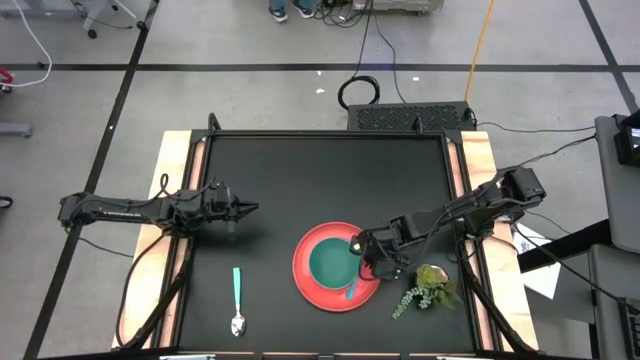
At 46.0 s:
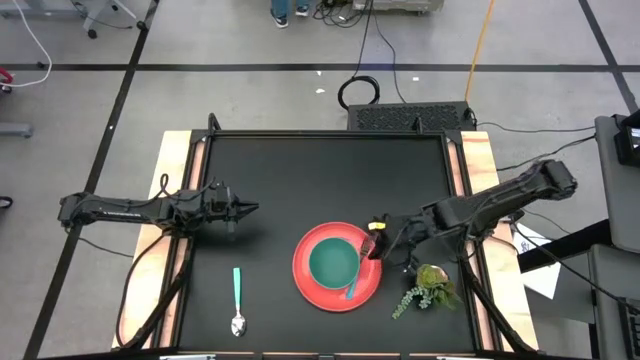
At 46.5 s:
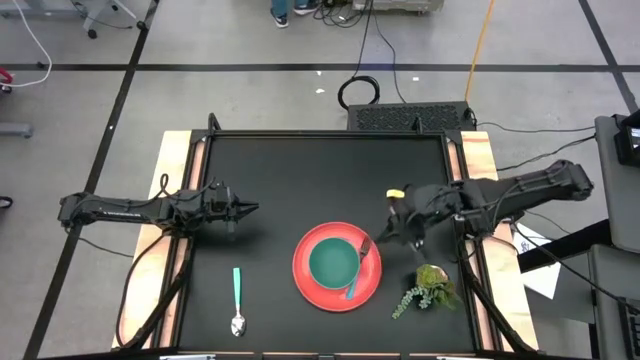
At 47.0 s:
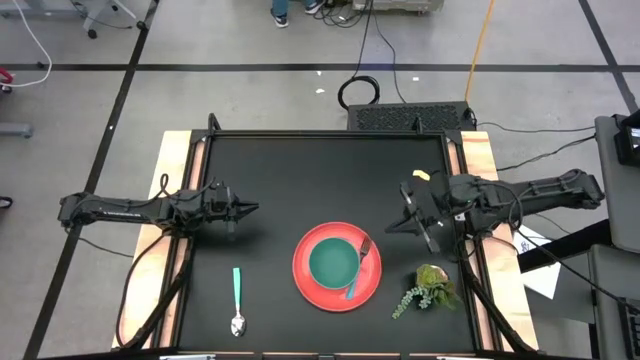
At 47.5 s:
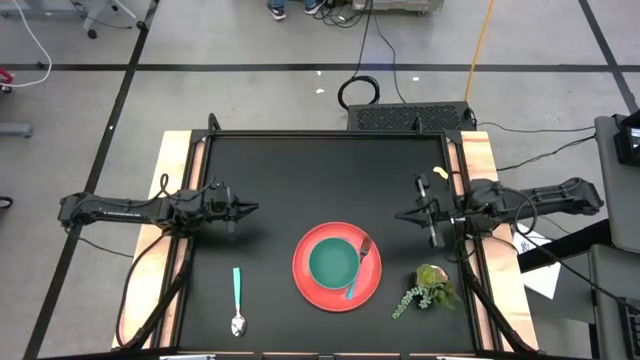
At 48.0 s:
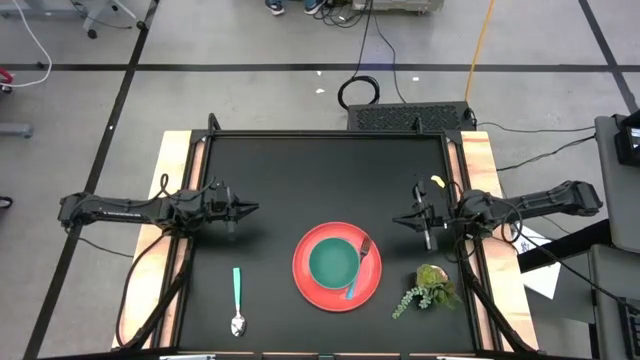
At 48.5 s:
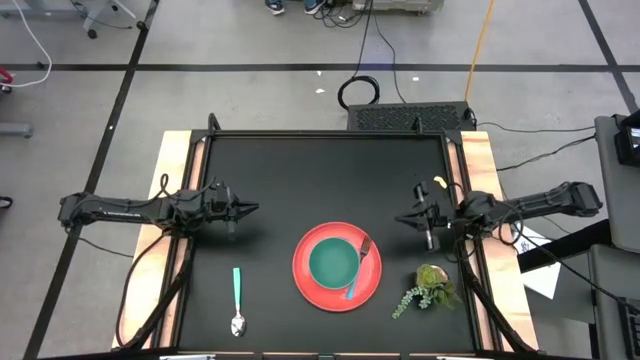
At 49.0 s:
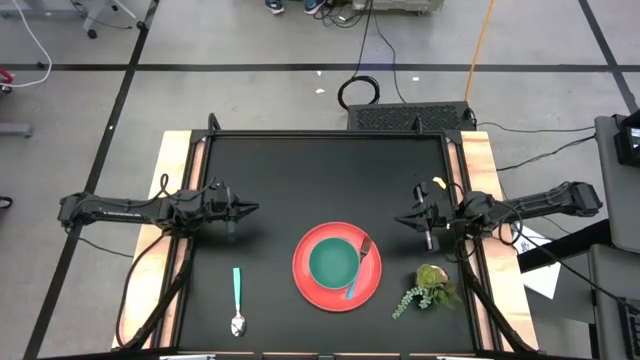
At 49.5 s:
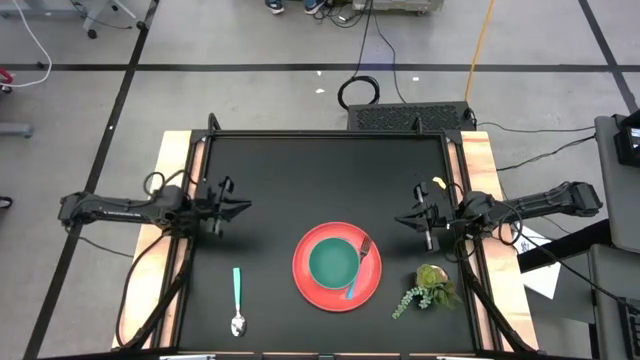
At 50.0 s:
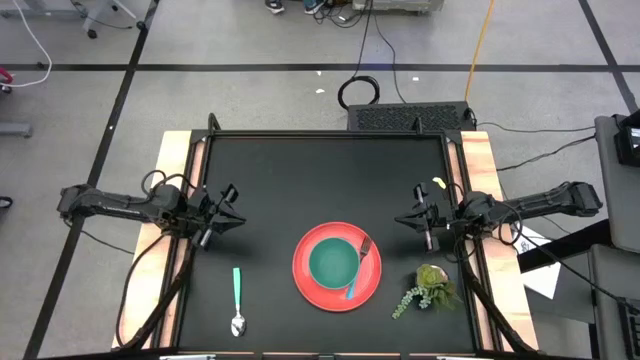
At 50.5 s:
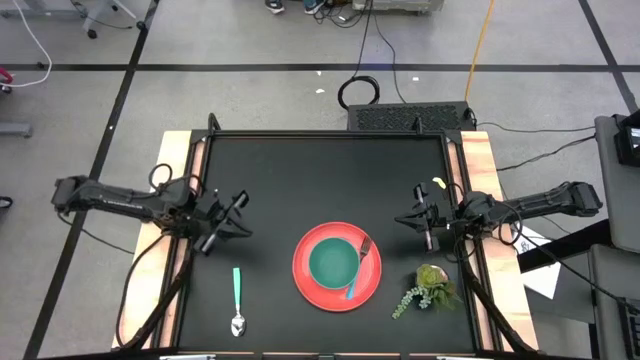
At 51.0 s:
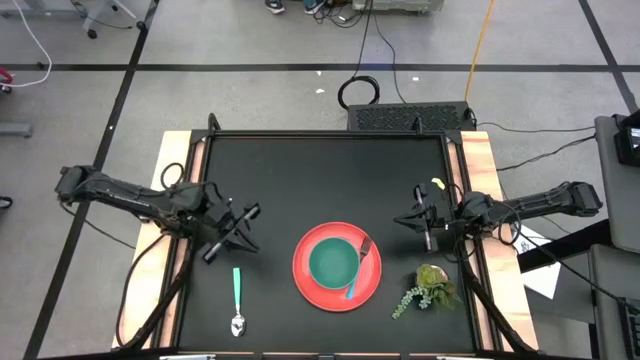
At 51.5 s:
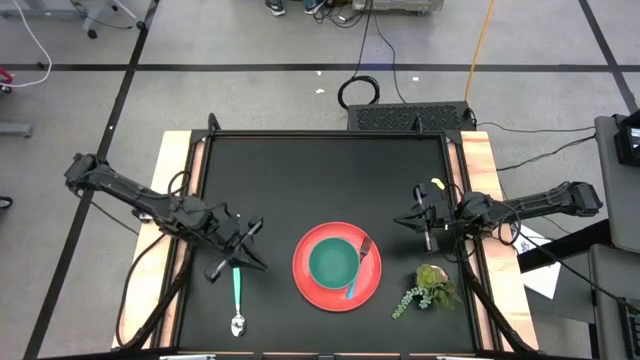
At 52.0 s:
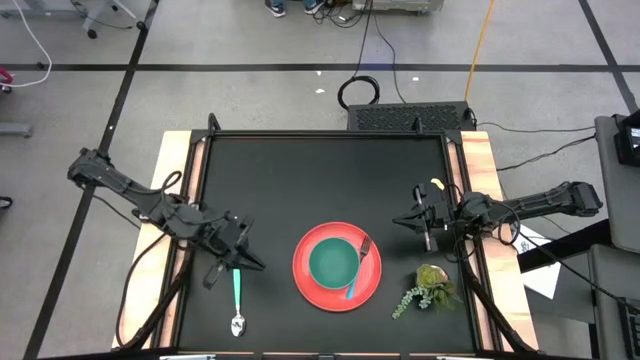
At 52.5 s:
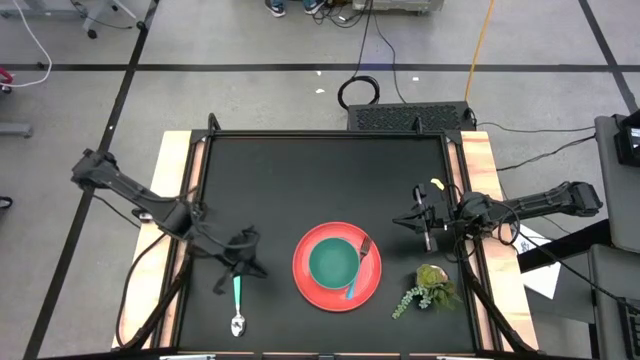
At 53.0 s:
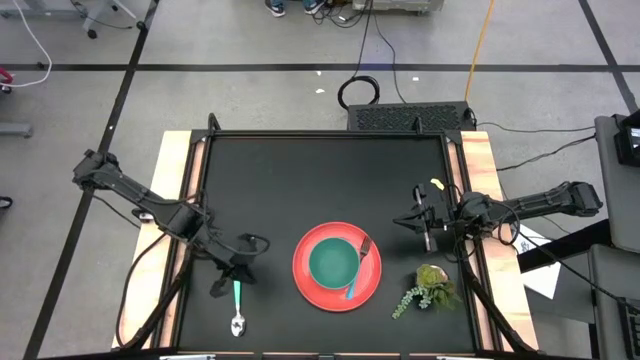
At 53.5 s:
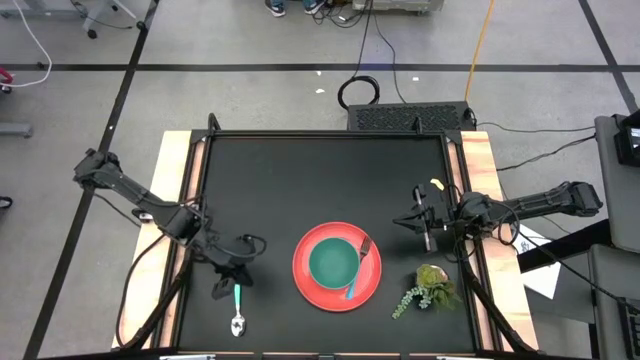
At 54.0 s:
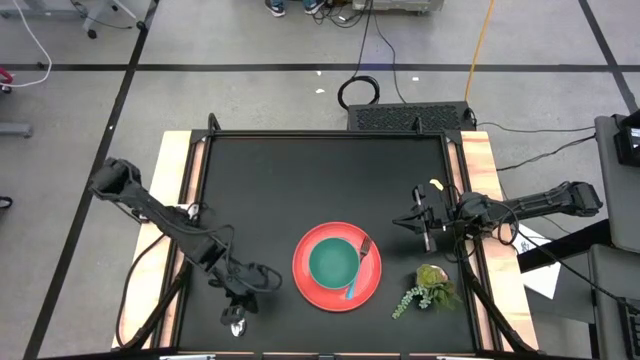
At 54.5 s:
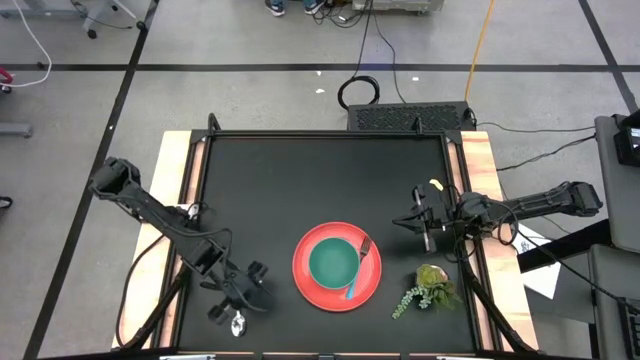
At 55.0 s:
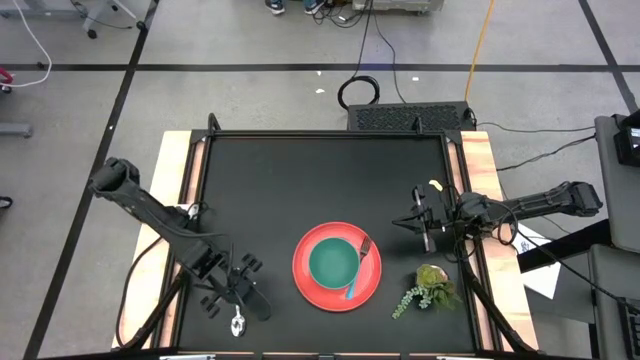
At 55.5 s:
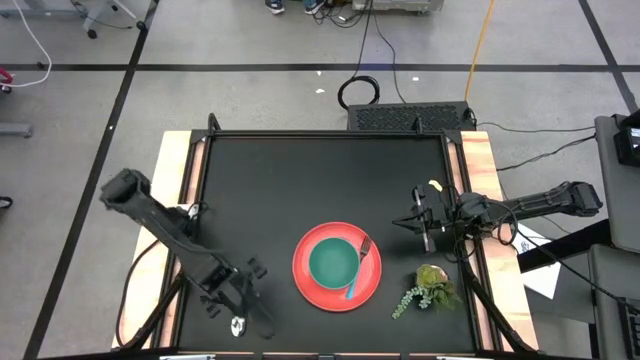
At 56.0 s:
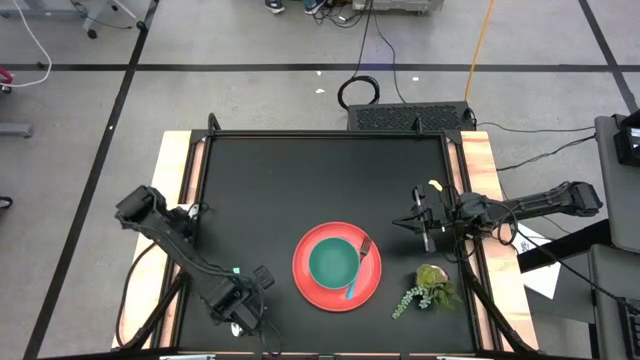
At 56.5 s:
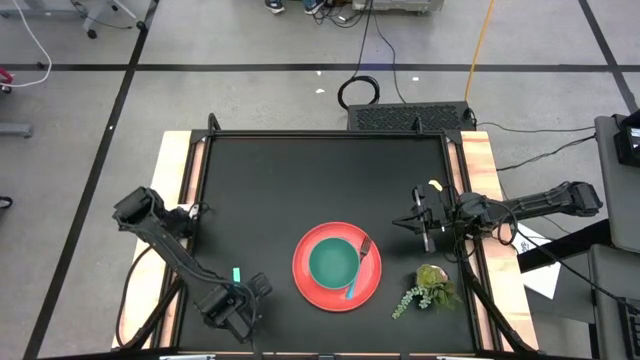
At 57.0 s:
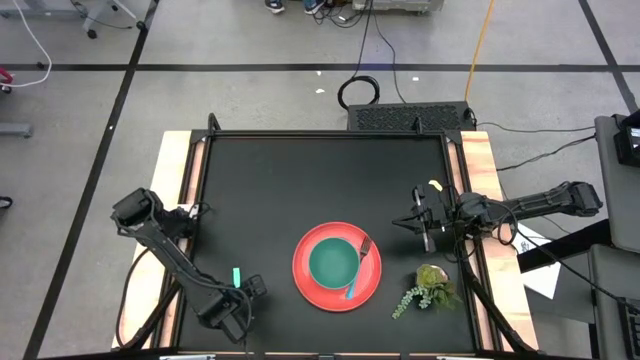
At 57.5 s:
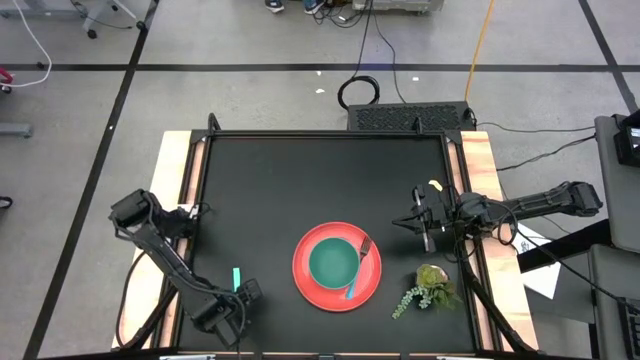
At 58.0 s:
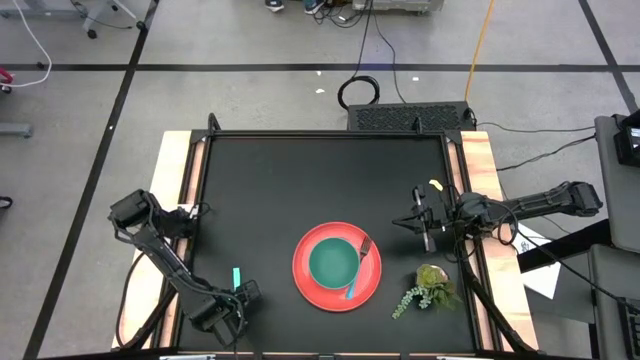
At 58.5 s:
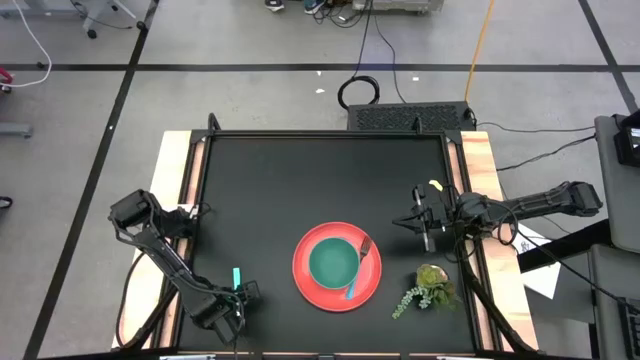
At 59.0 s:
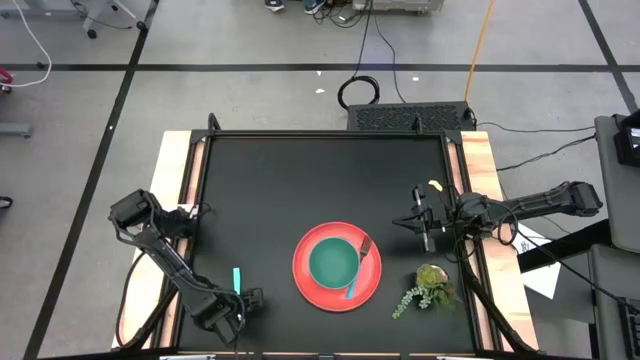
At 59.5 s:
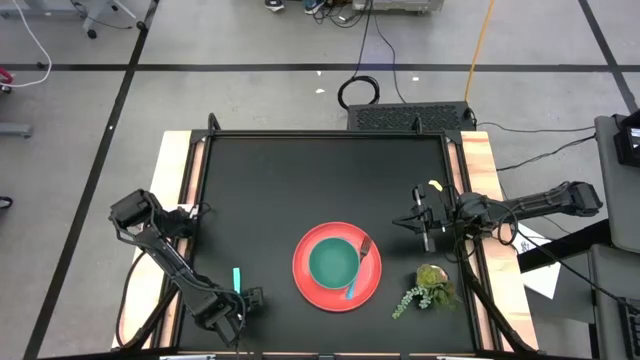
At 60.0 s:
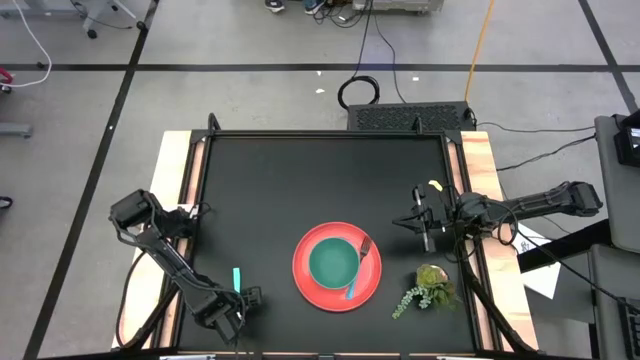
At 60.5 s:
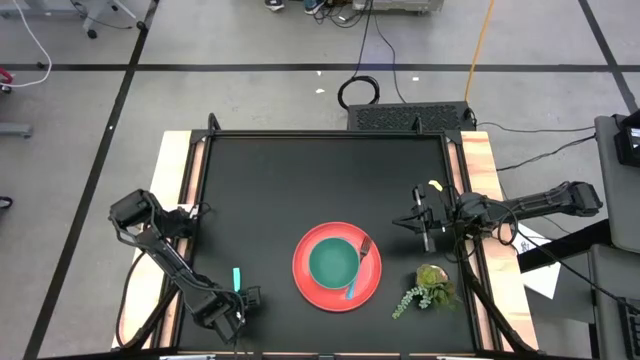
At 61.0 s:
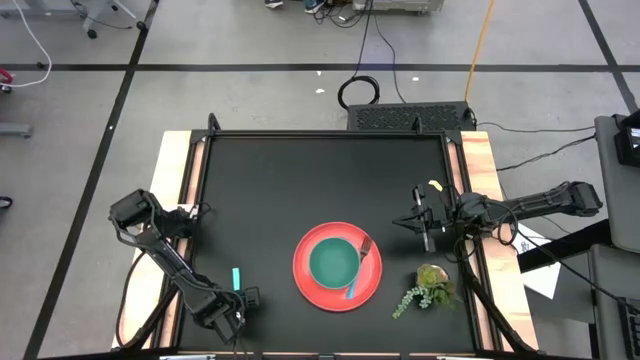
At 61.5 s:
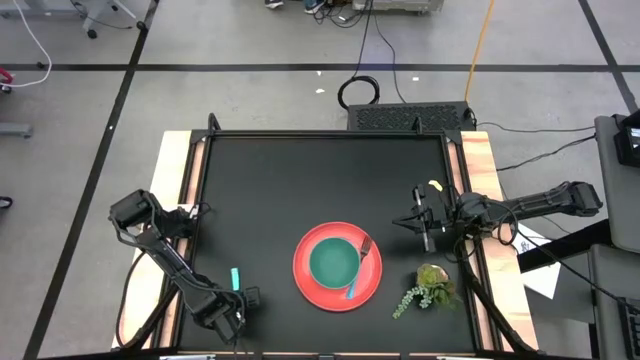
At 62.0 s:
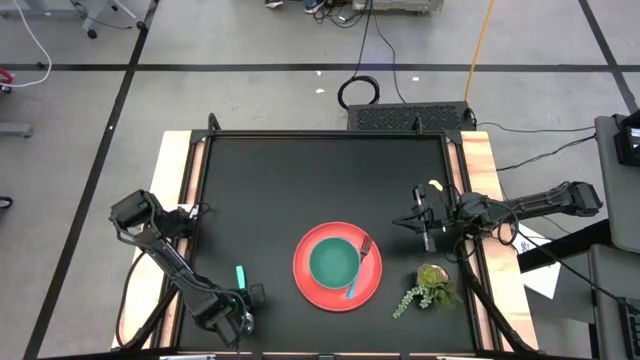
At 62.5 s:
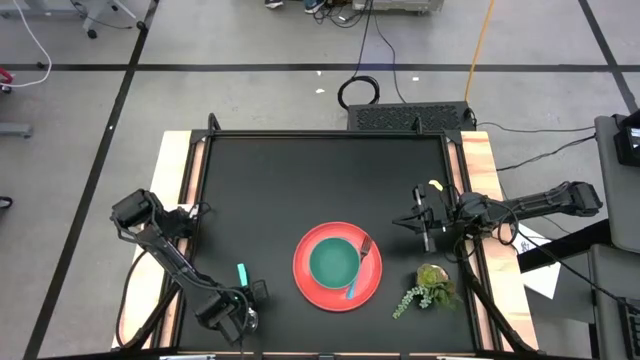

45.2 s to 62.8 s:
Task: Set table place
Put the green spoon into the green bowl on the orange plate

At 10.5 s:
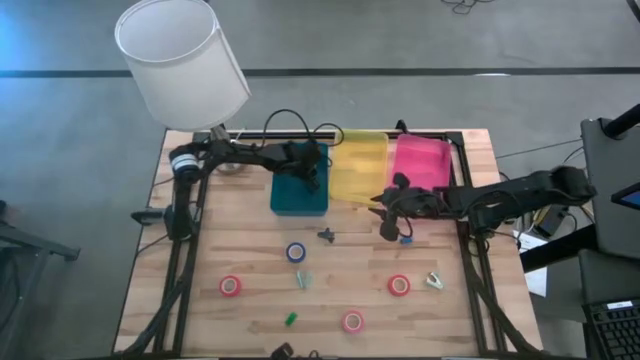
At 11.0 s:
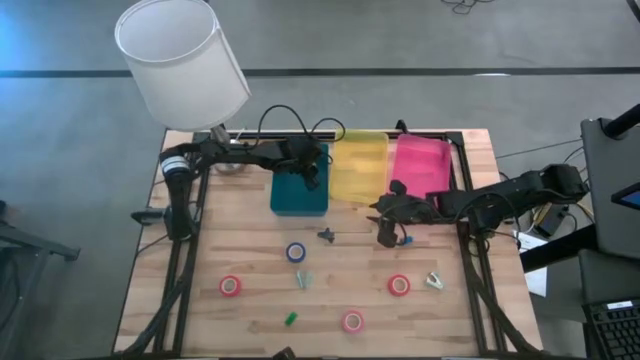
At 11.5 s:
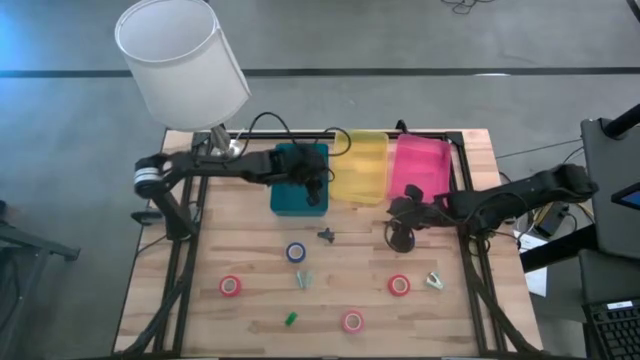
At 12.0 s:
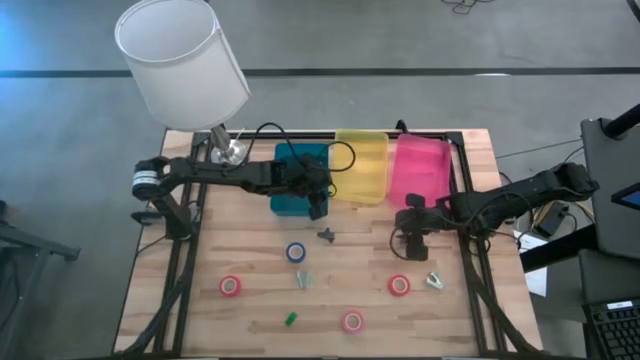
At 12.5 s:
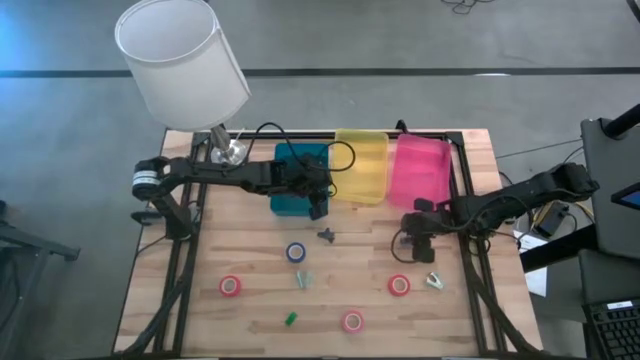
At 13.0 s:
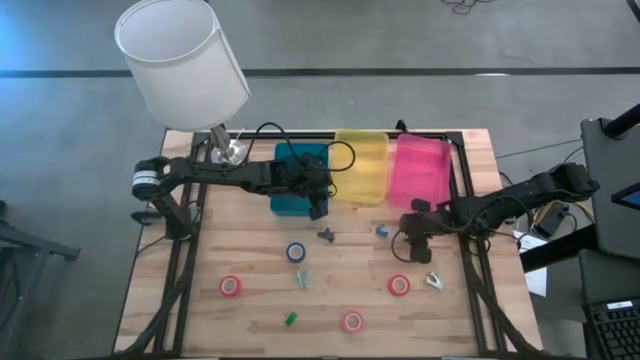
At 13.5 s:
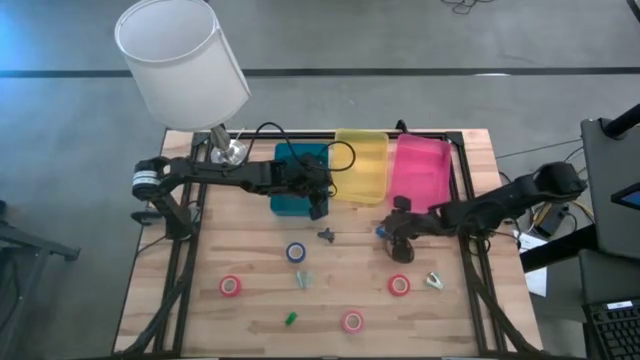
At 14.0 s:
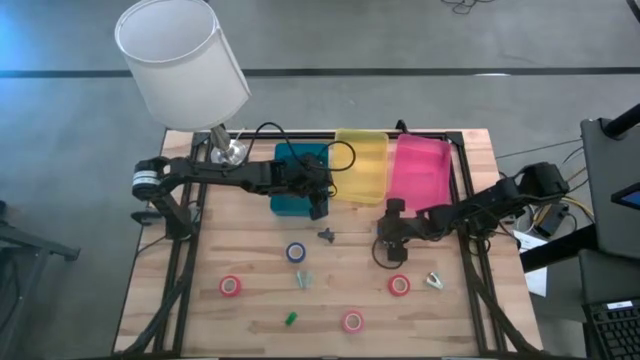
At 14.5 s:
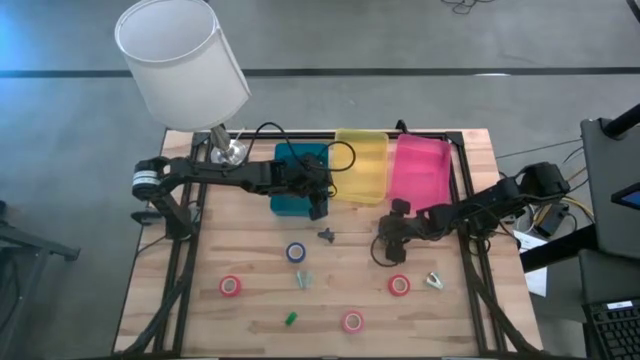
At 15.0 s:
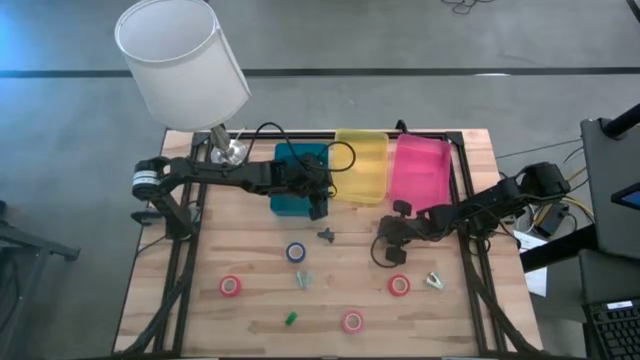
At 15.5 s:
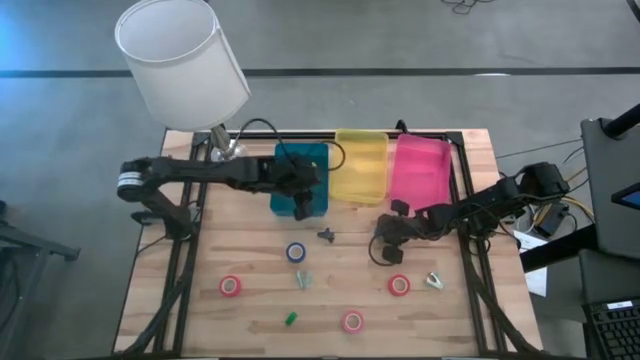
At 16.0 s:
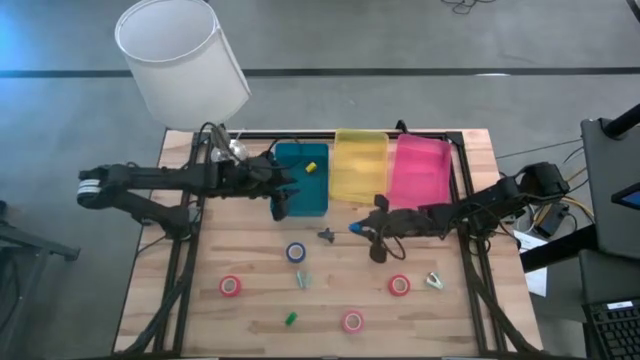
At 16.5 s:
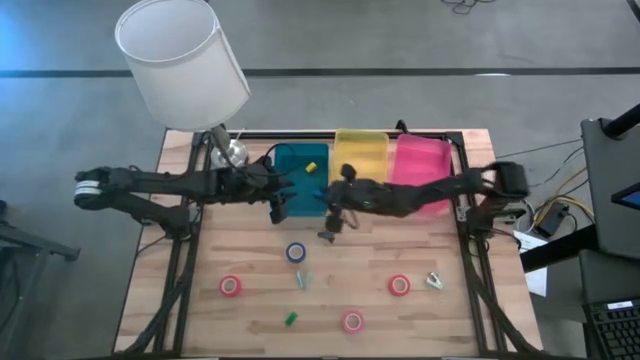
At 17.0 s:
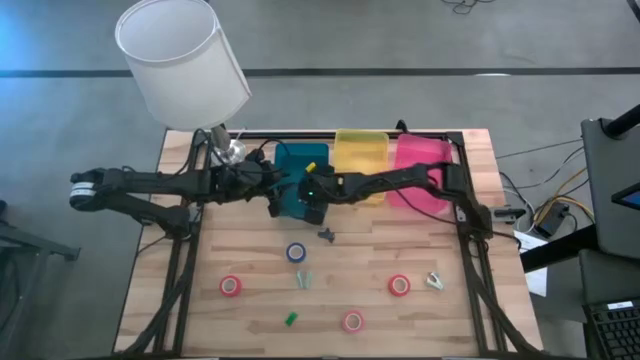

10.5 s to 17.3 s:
Task: Pick and place Stapler, Stapler remover, tape
Put the blue stapler into the blue bin
